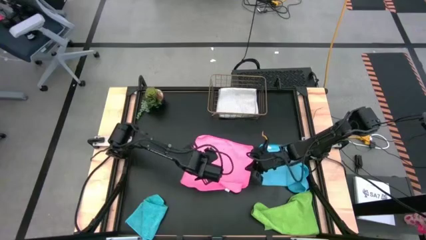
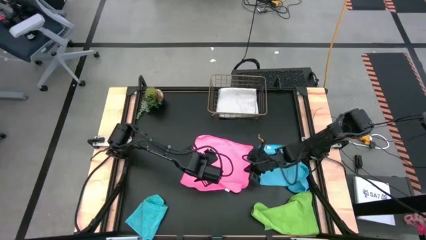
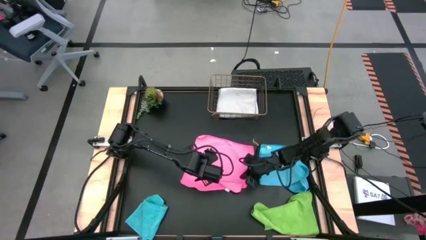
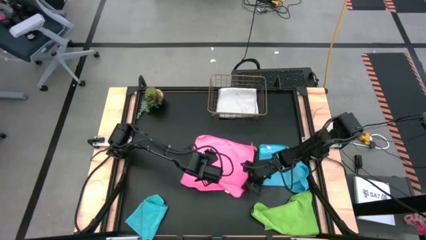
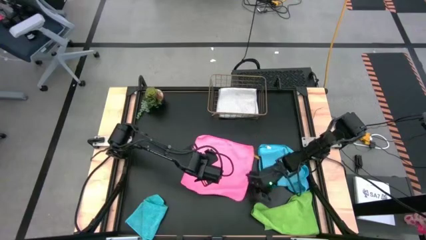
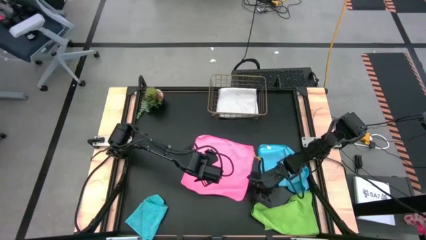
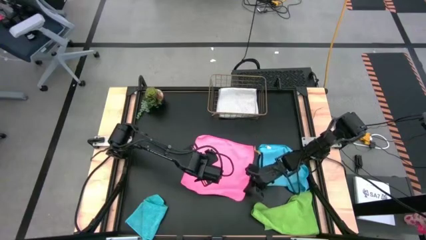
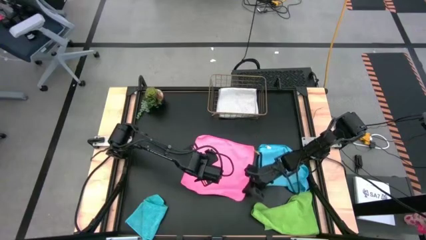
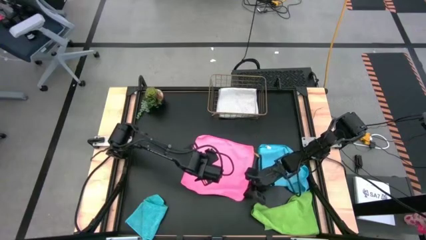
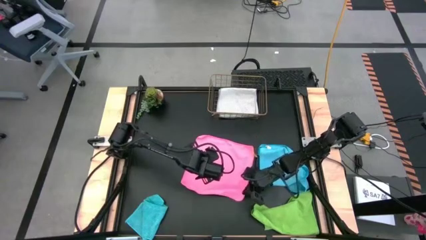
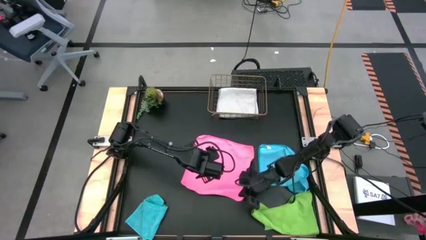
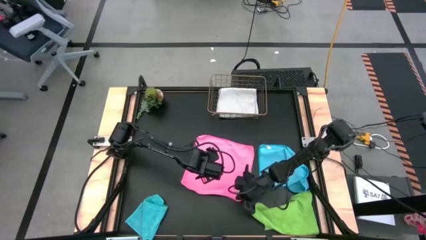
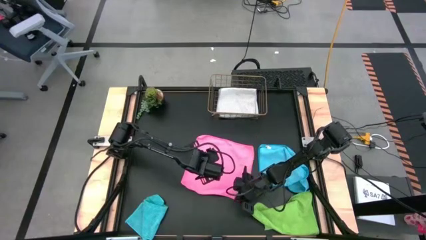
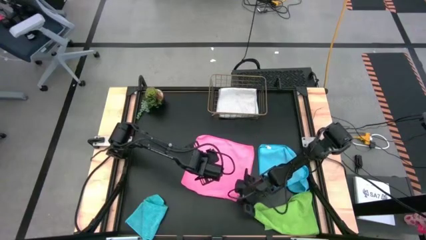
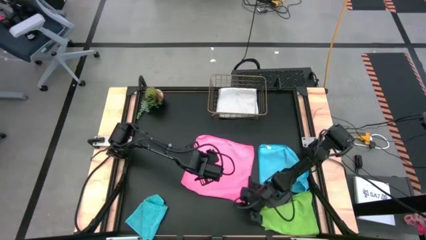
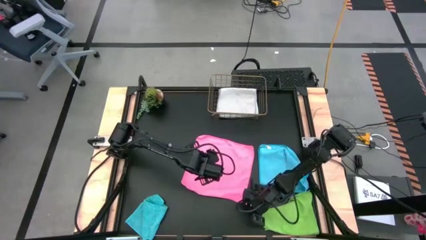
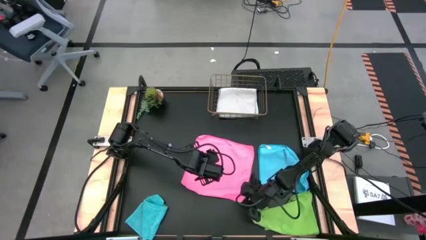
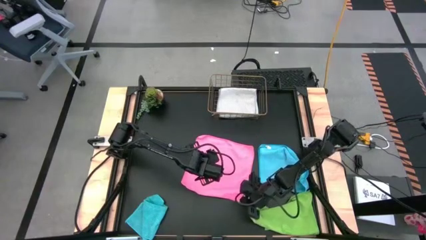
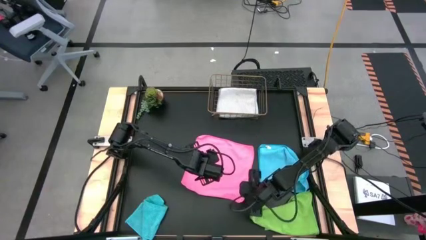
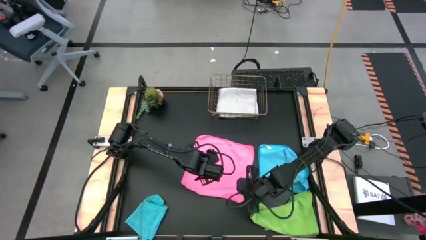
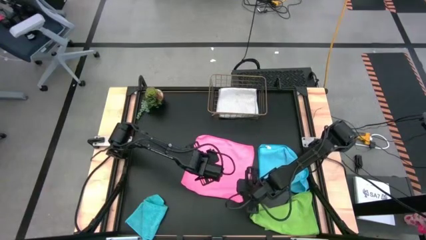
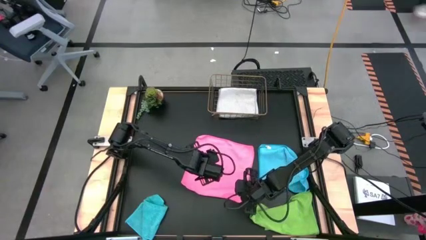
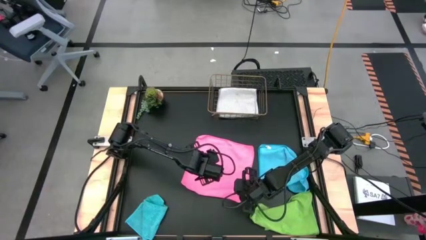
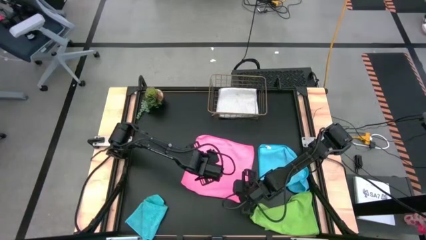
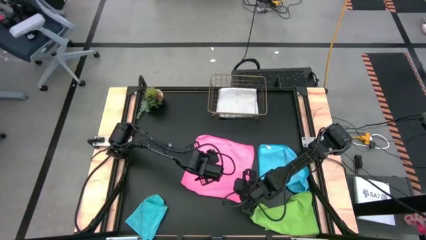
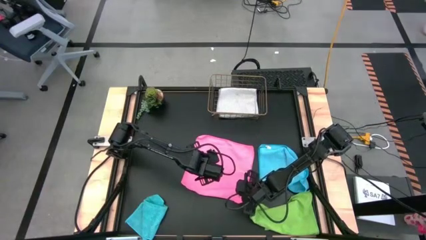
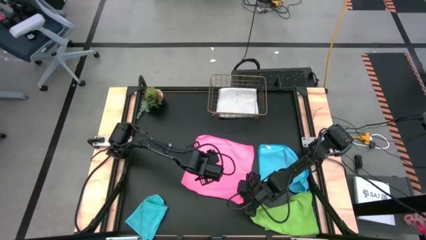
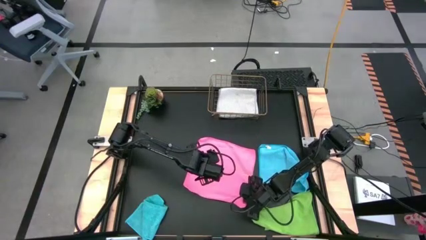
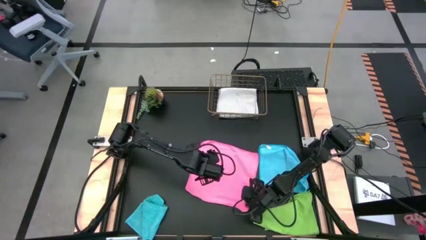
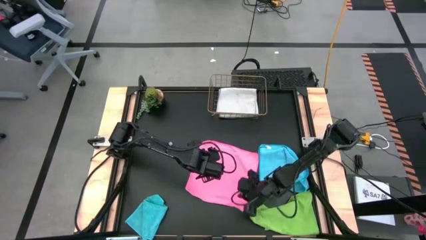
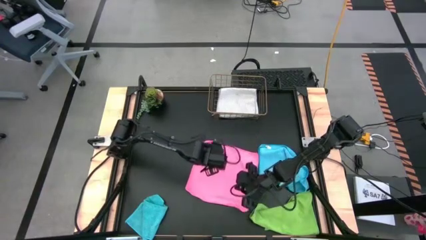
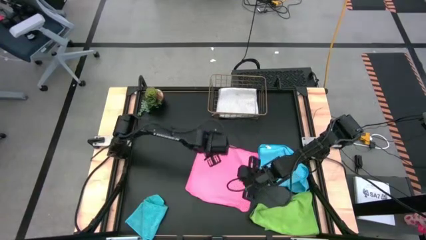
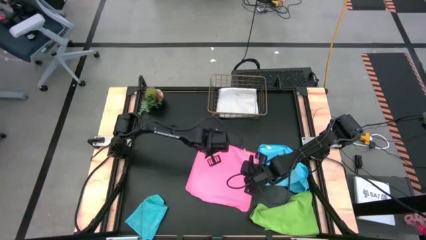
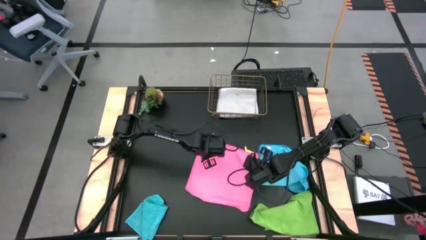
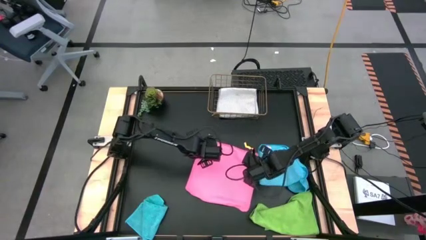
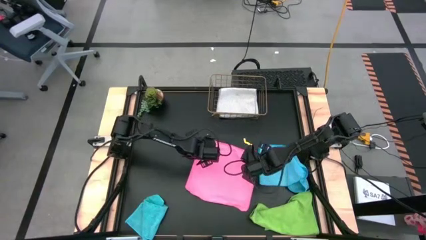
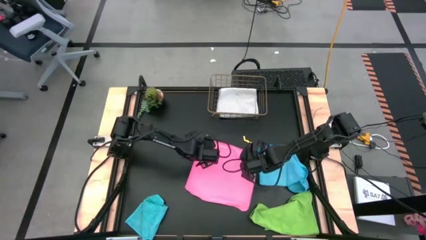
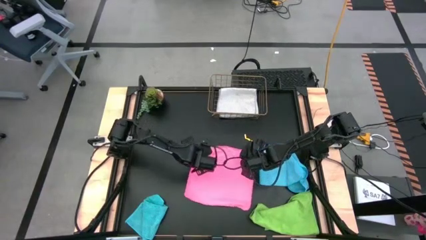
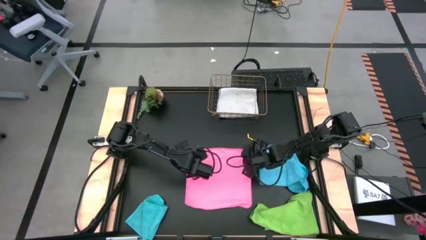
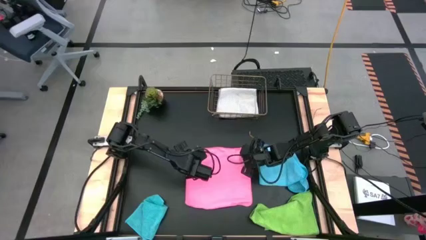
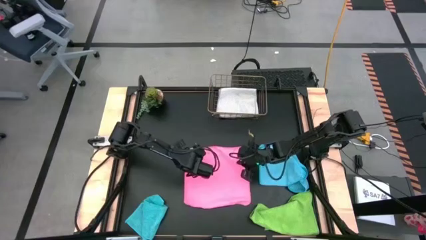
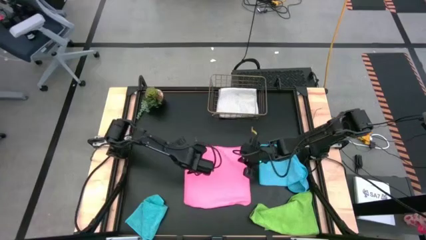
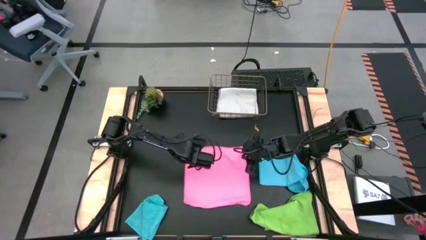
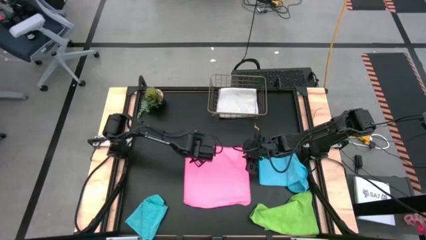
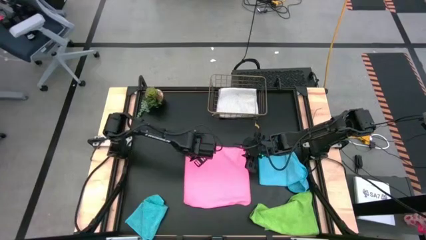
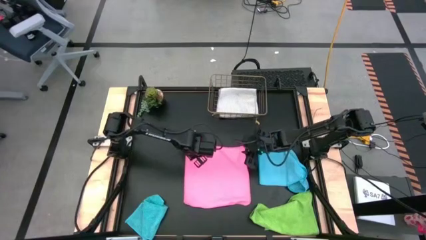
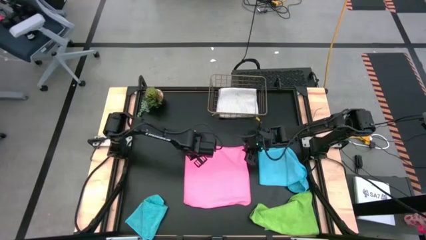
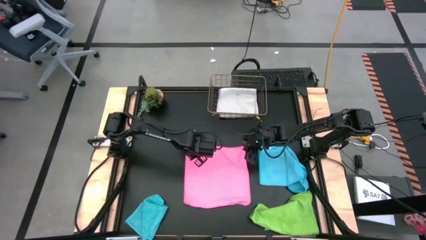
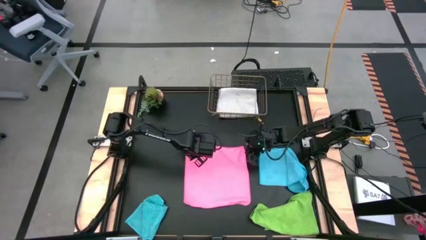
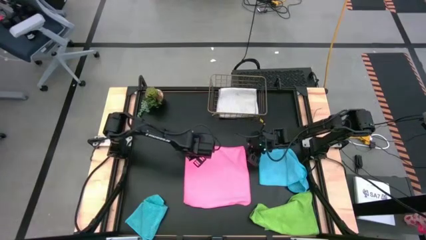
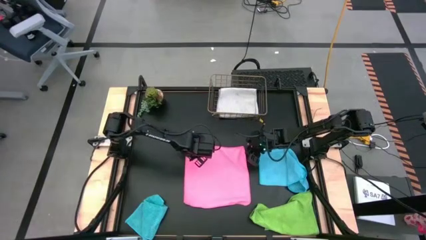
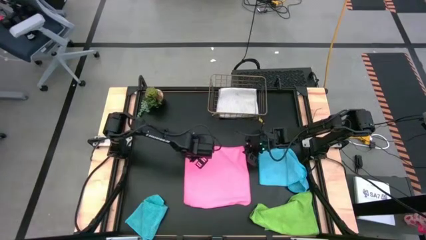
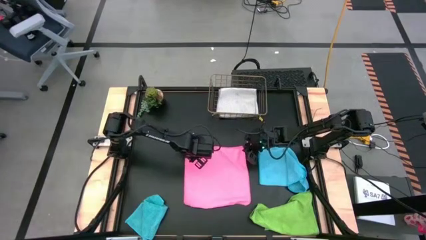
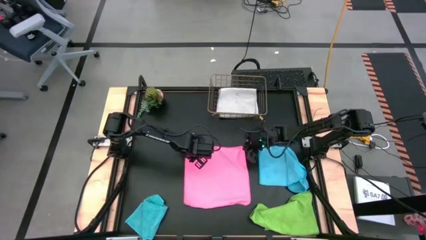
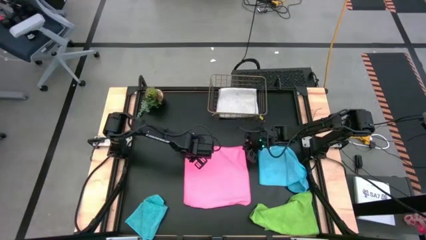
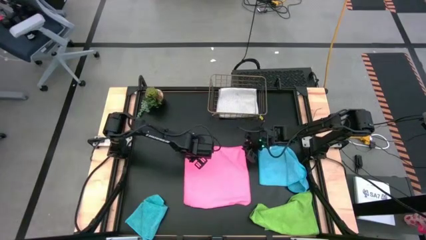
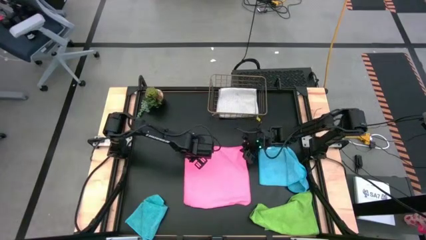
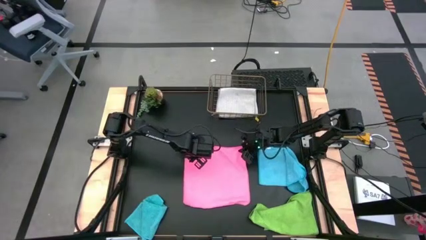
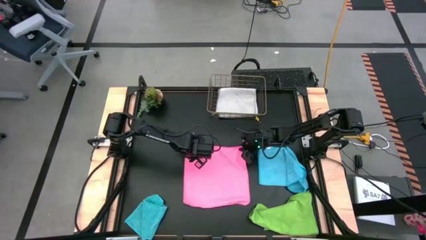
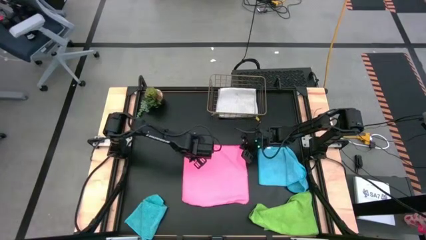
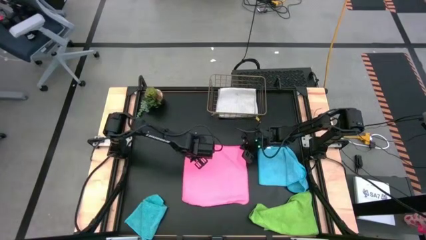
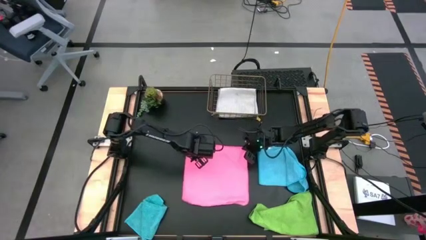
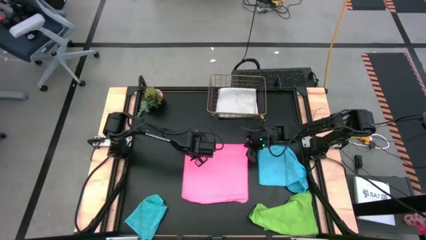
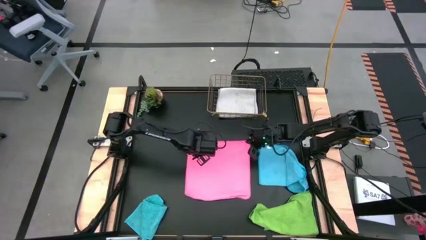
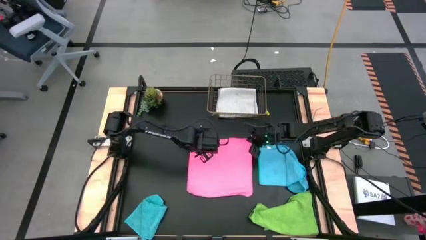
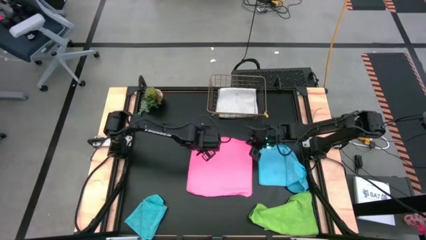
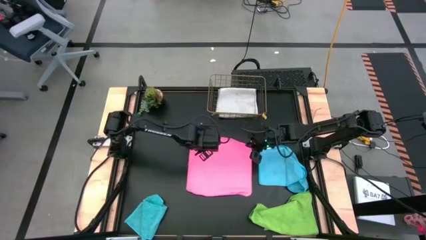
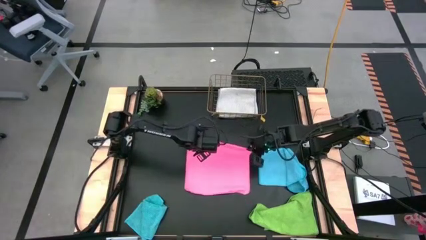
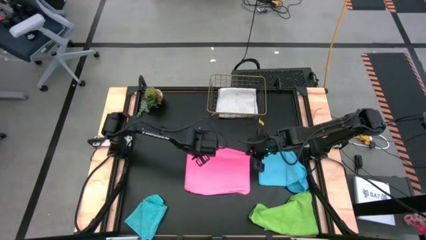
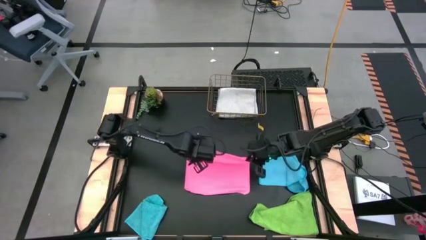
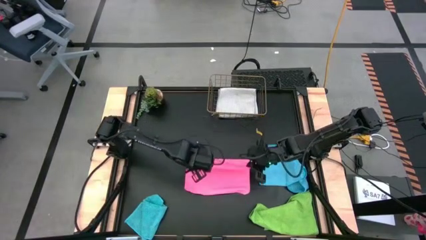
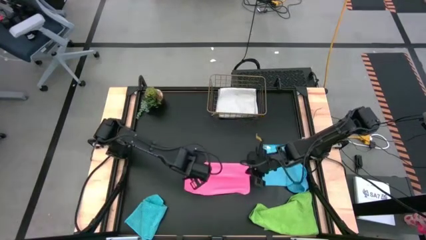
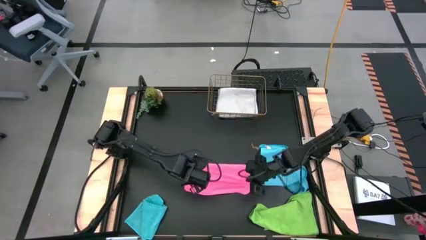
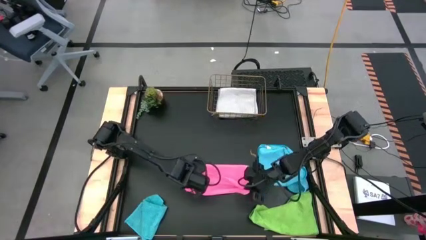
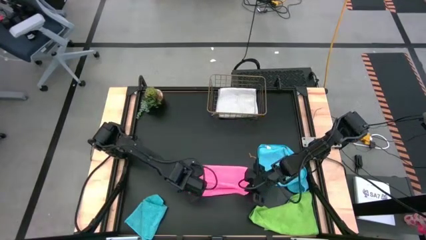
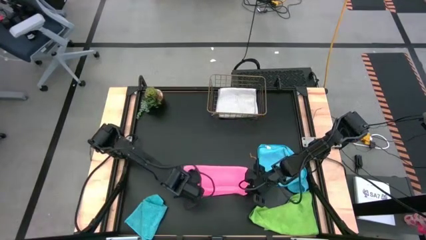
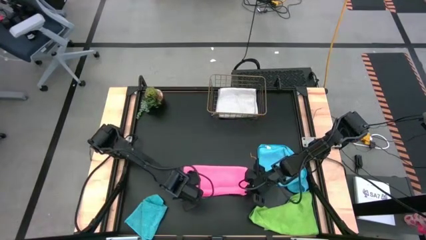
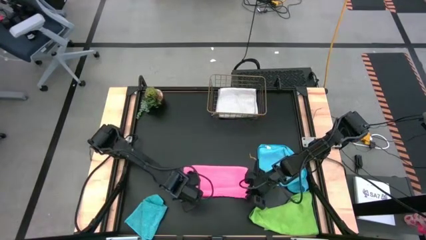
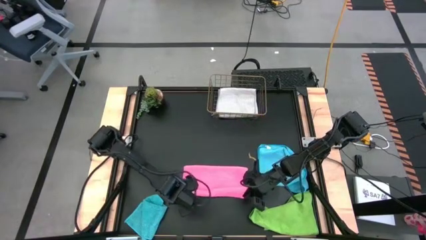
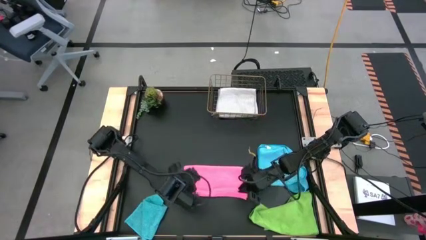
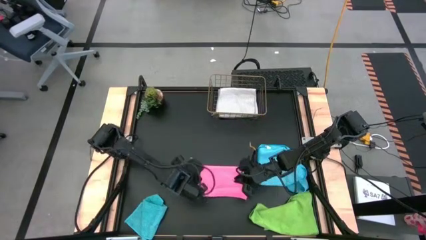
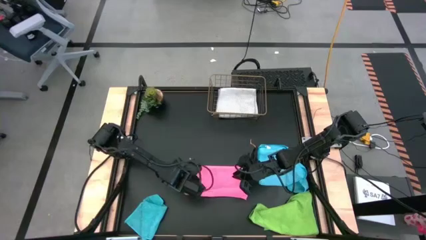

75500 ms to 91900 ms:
Task: Fold microfiber towels
Fold the pink towel
